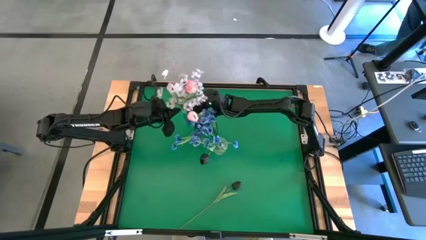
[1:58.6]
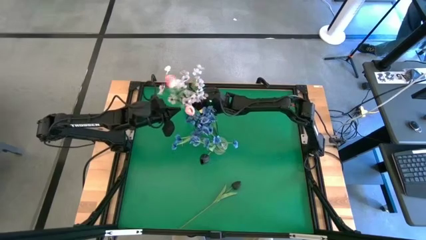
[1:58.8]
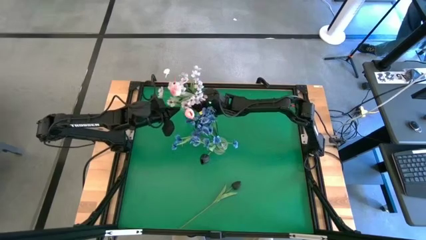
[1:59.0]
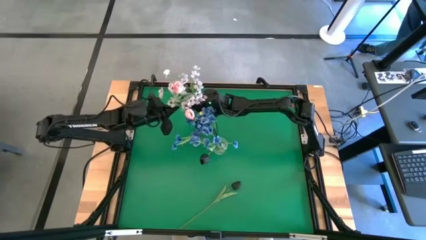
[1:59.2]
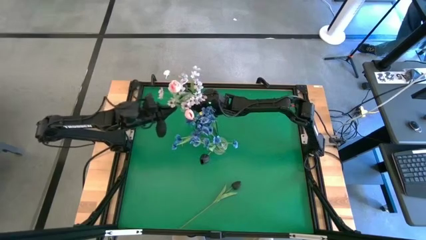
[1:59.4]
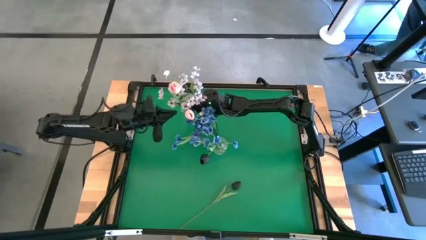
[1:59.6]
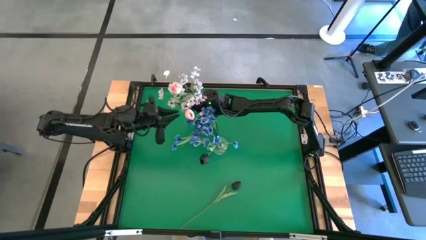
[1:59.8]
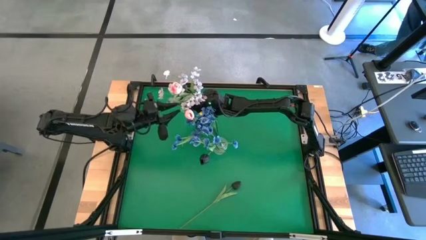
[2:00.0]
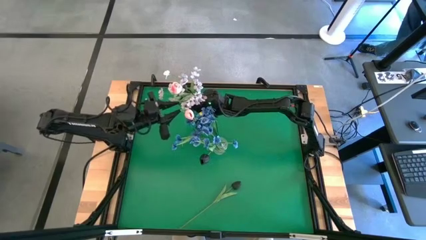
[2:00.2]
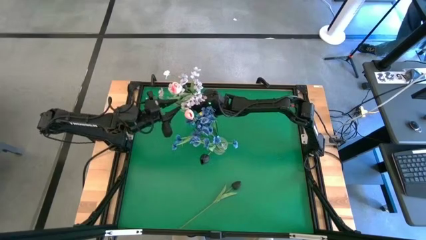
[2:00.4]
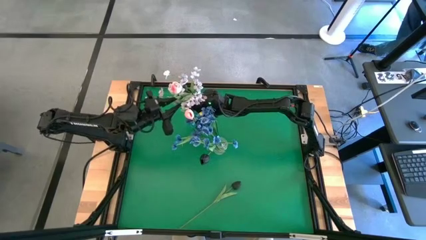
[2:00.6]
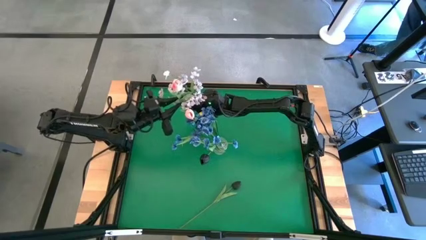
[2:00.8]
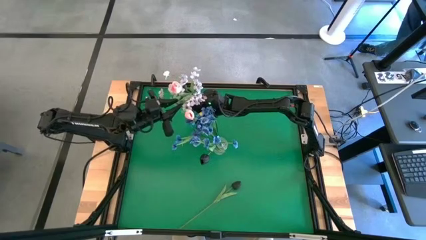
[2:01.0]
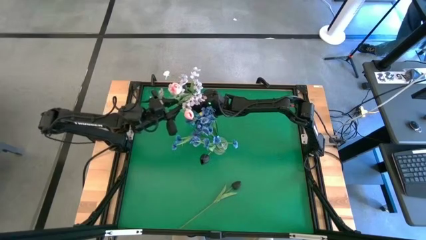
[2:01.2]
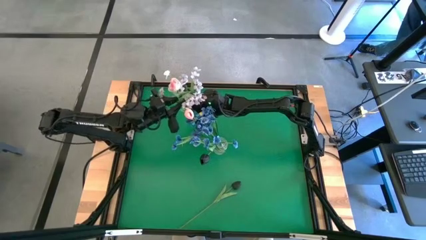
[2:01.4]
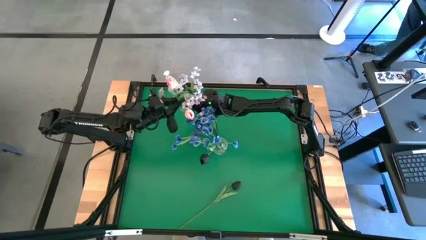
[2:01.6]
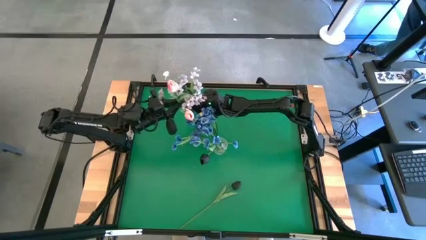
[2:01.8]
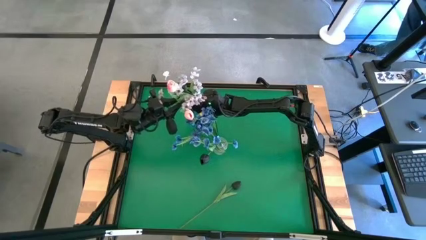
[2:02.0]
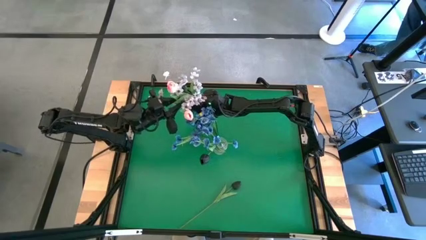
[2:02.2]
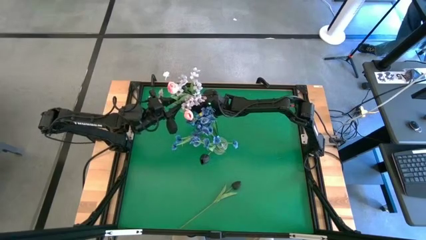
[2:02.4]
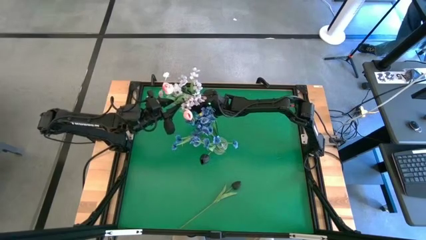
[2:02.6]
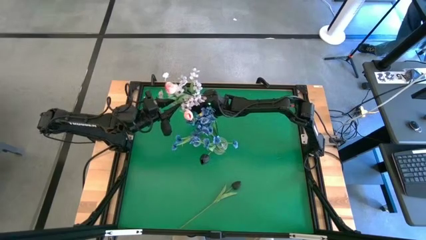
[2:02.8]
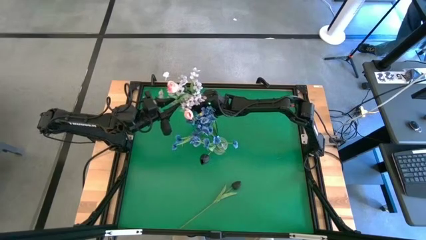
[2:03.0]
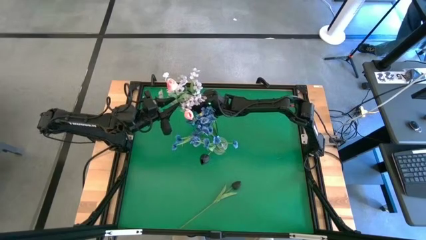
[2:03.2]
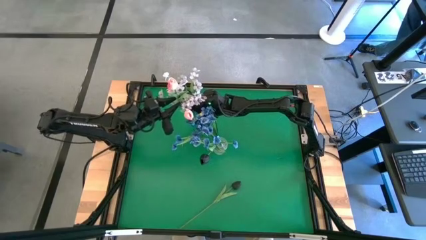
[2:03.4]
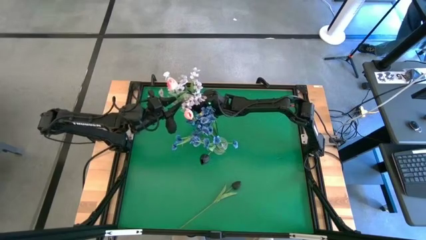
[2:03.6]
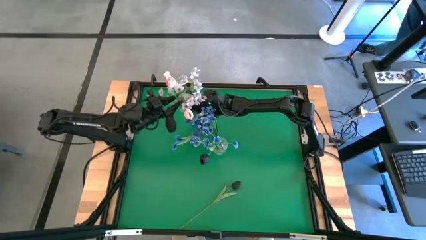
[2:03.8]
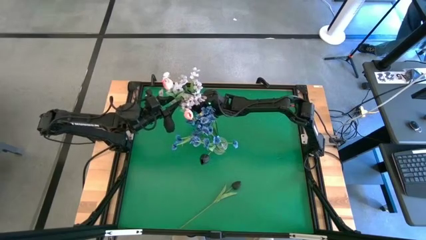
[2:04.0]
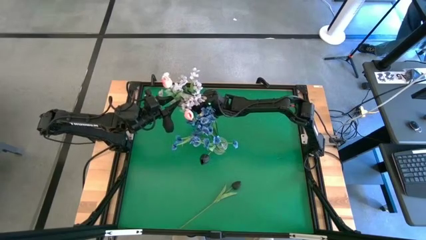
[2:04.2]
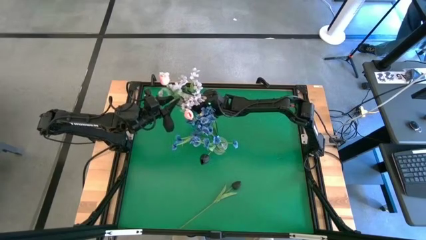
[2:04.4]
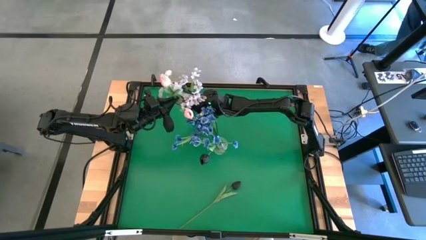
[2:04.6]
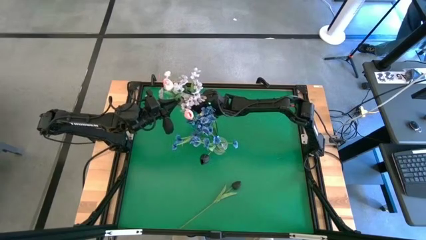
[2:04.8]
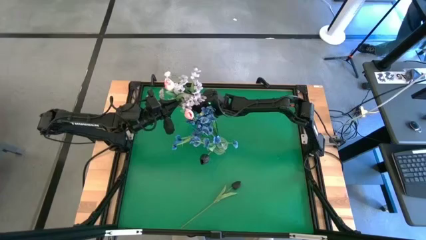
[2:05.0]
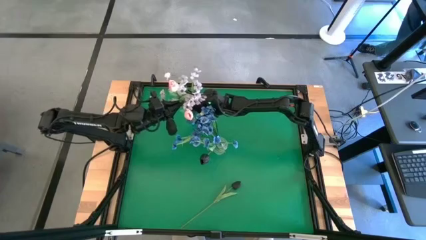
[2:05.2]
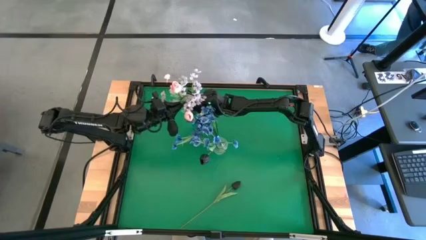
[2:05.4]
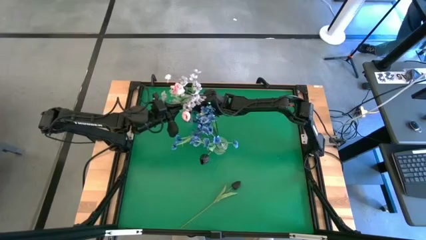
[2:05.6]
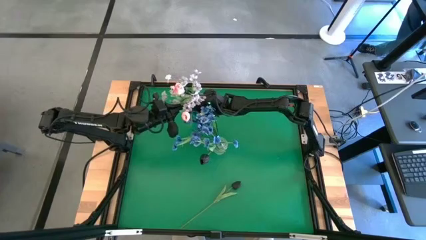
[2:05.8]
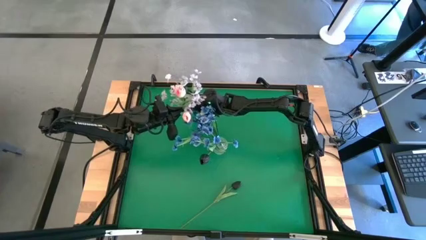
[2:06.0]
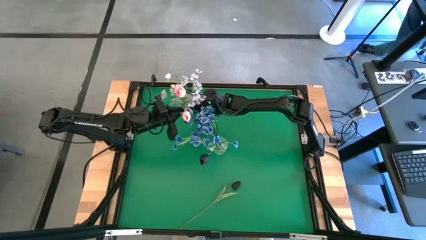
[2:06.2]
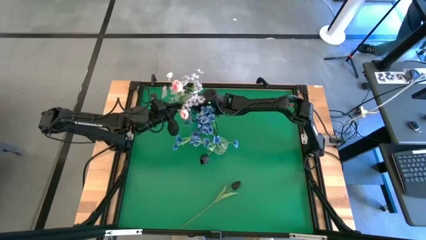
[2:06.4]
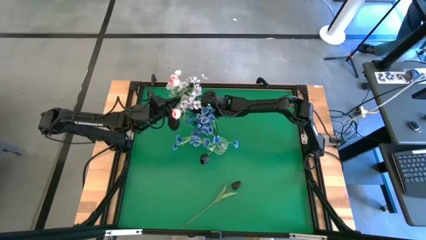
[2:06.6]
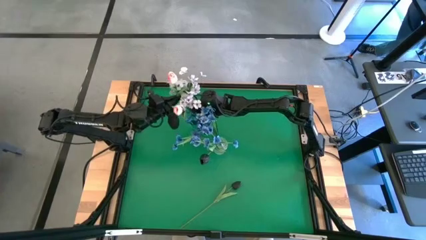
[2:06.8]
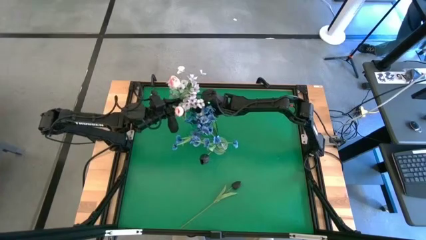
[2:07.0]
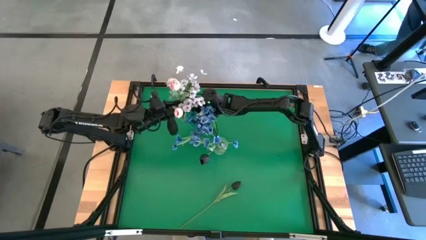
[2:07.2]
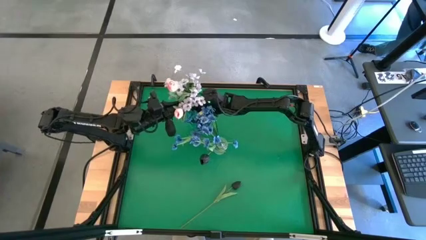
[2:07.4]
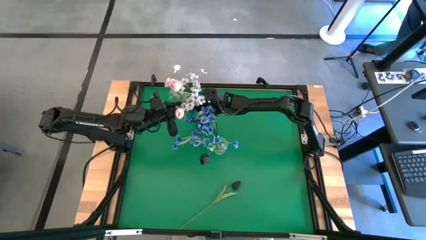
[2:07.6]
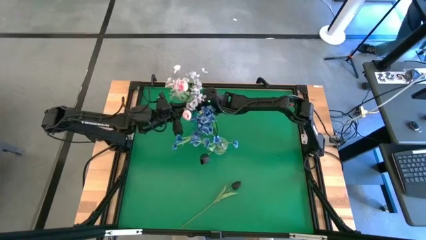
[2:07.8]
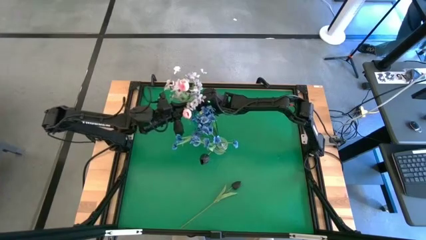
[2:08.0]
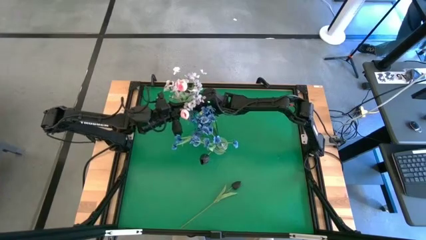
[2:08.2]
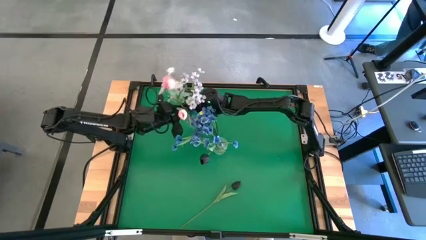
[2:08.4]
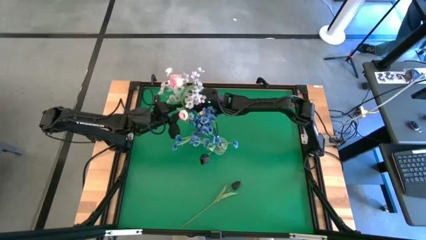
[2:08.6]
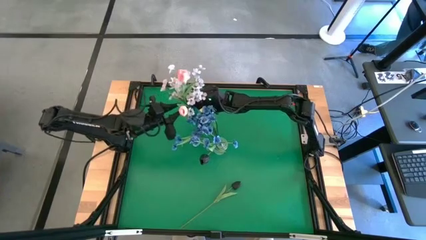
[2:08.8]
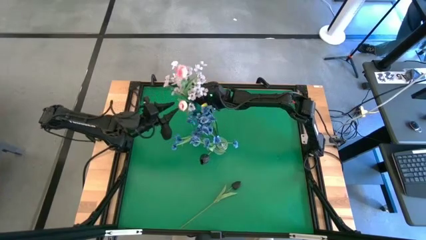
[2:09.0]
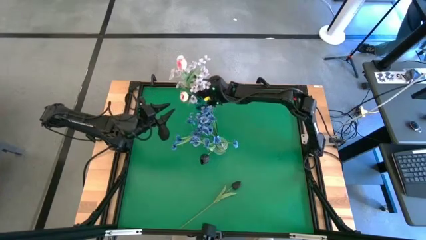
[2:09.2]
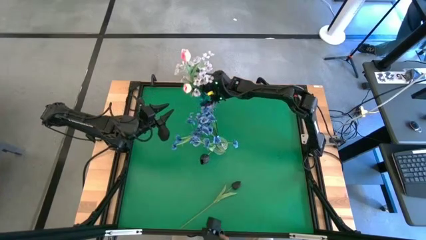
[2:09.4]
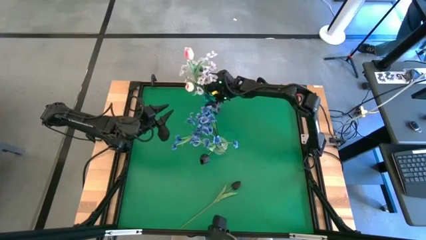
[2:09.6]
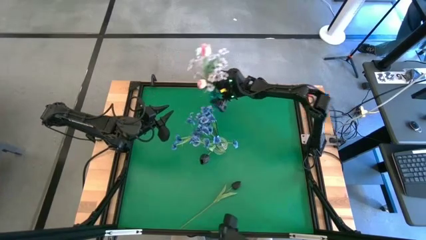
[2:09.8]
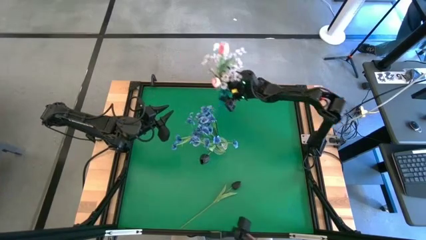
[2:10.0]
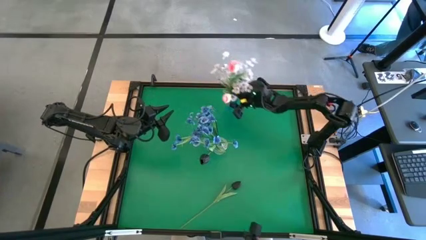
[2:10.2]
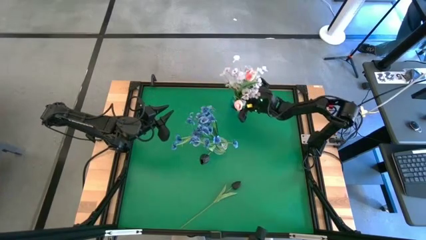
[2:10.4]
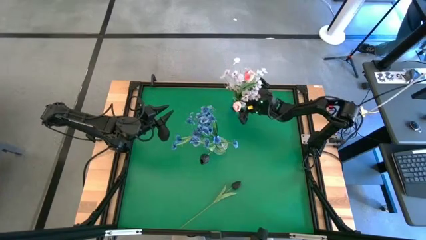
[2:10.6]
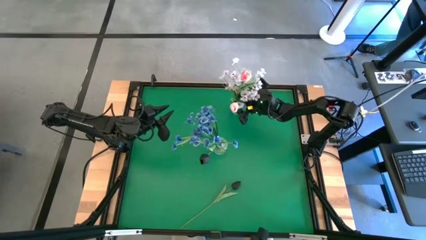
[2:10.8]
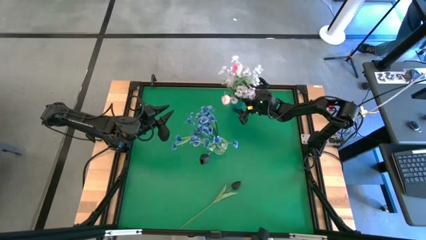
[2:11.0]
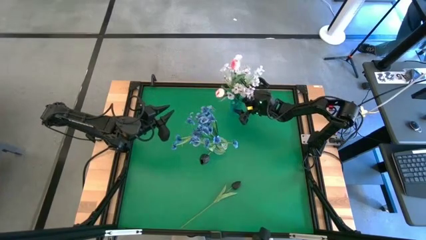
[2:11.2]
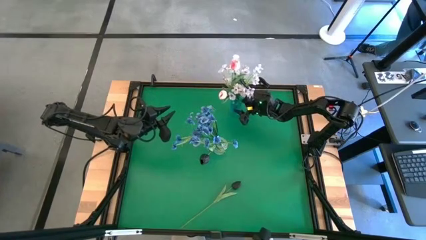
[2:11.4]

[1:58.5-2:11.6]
Task: Sort flowers into vase by color
Move the blue vase slightly to the right
